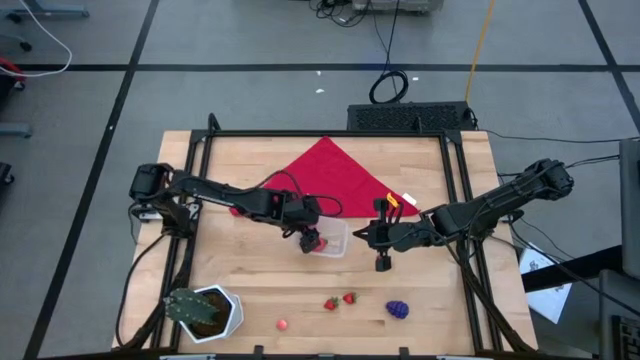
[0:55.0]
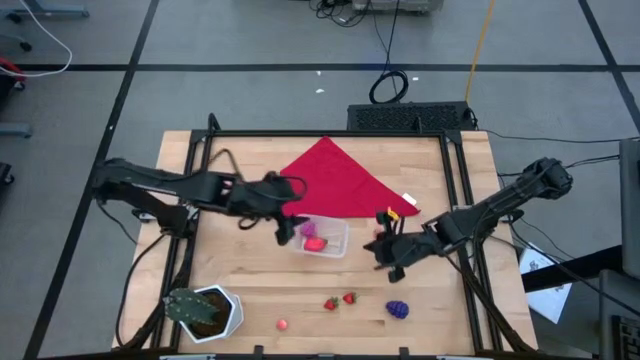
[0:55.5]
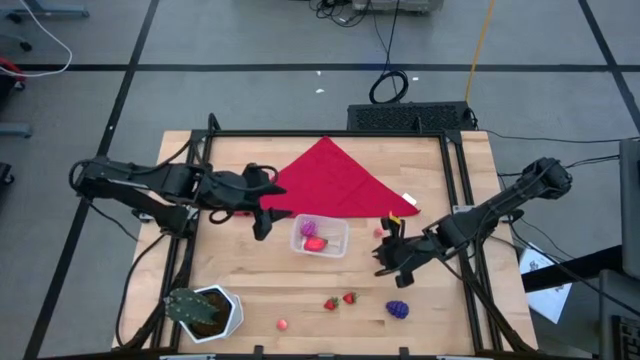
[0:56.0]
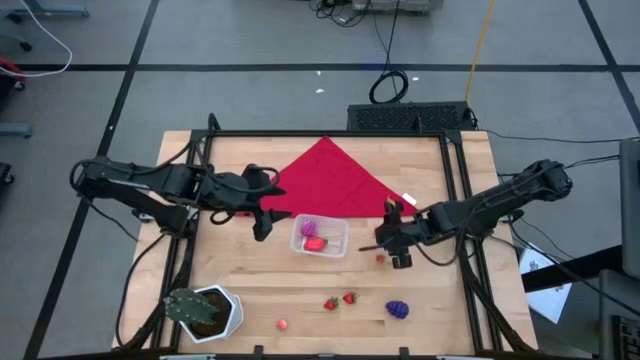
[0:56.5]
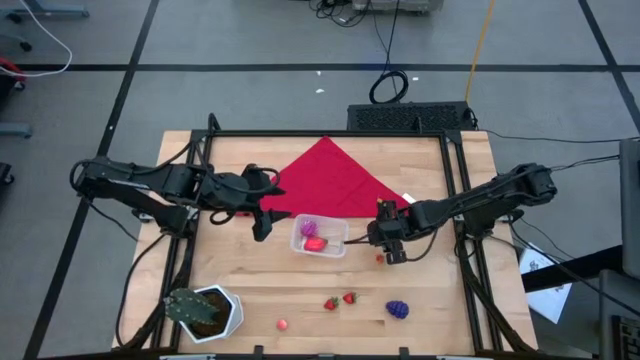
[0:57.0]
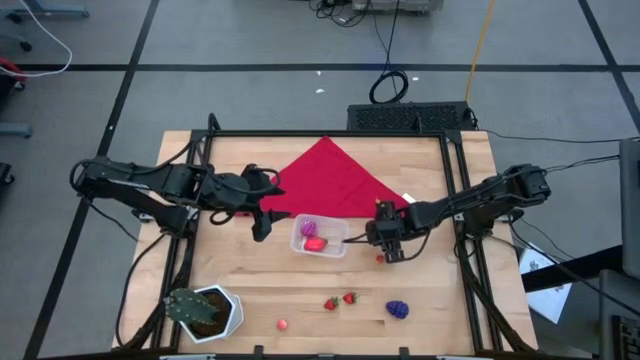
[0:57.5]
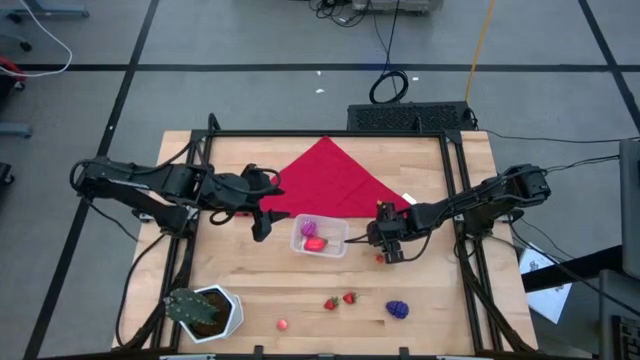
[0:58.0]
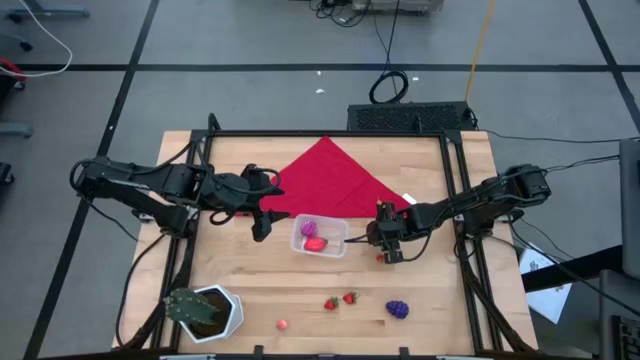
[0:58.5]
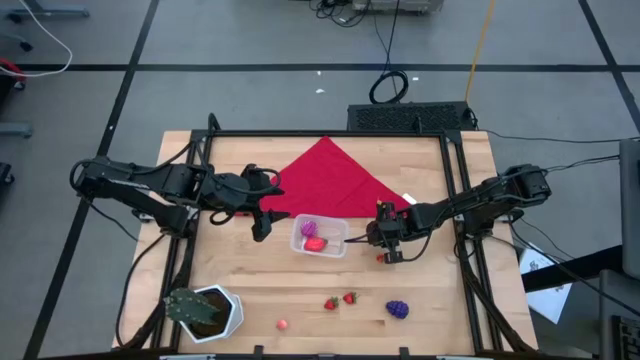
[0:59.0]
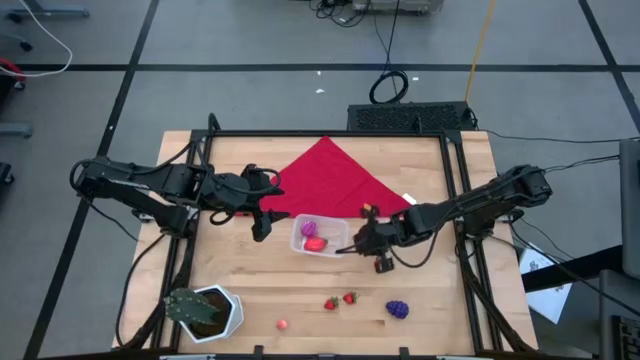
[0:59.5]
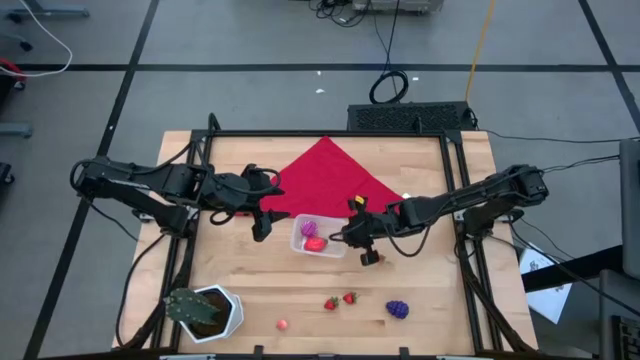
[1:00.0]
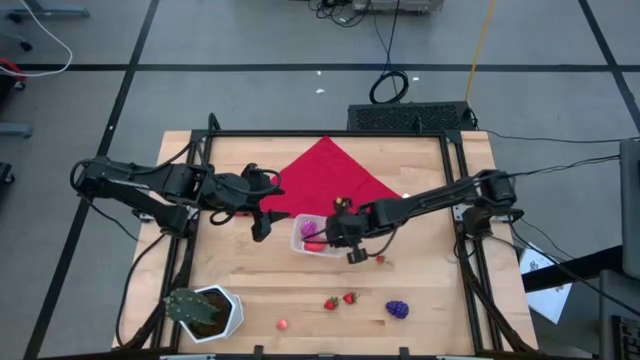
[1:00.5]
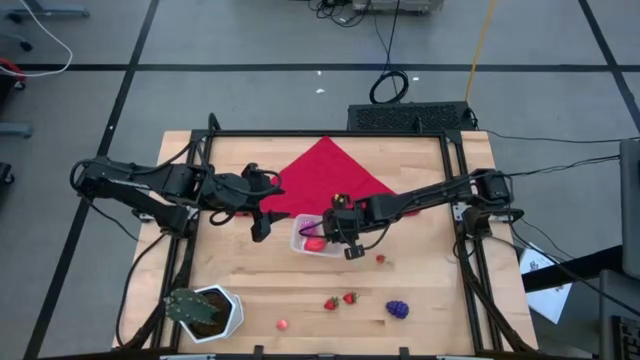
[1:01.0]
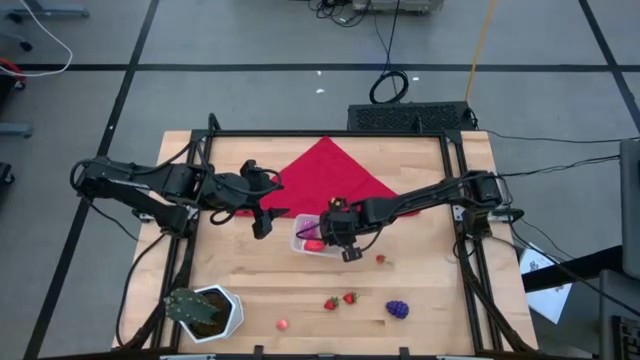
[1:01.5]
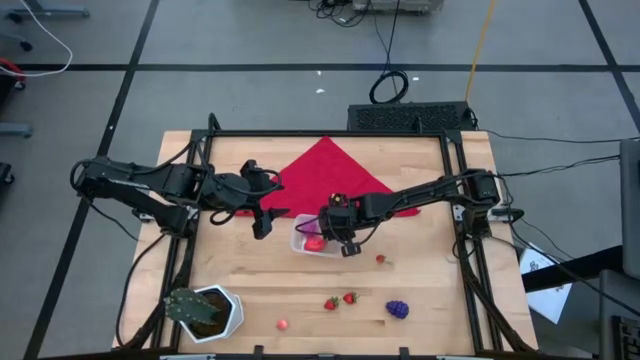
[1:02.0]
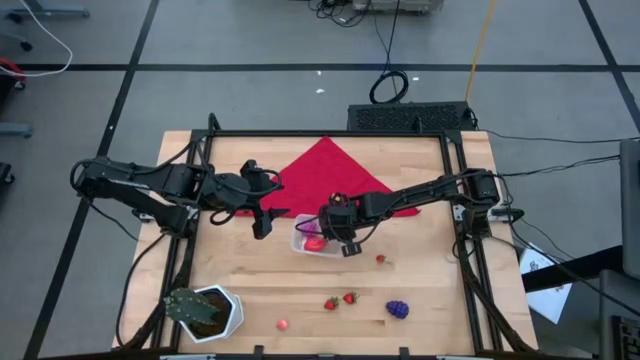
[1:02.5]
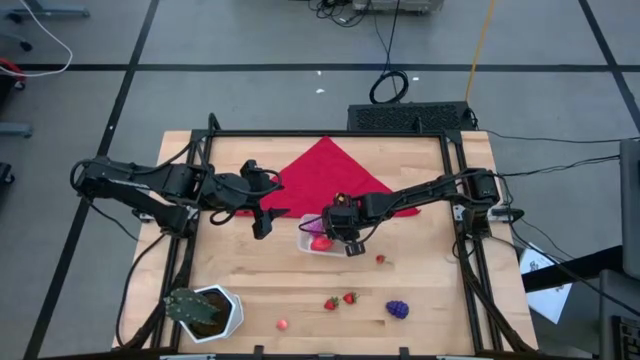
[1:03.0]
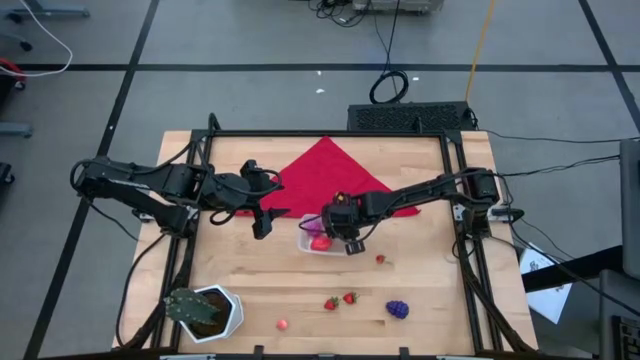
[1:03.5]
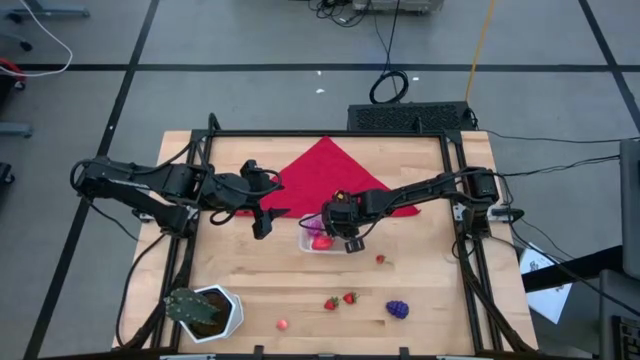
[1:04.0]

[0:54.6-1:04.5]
Task: Pick and placing Produce into tupperware
Put the top pink peach in the transparent bin

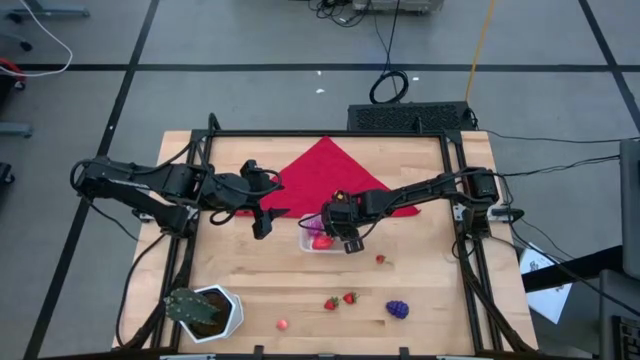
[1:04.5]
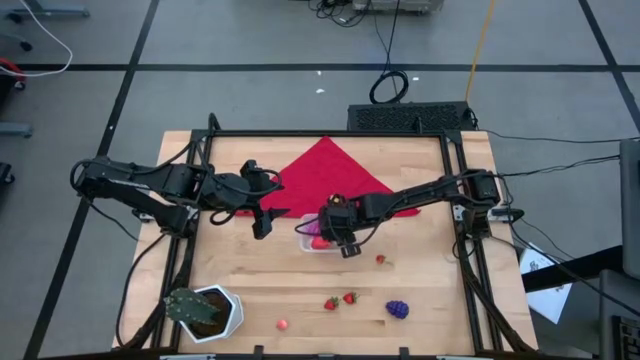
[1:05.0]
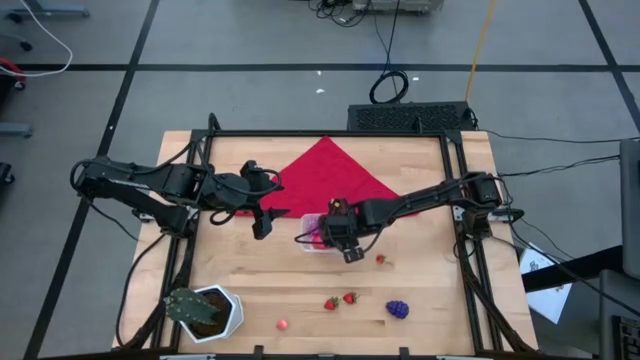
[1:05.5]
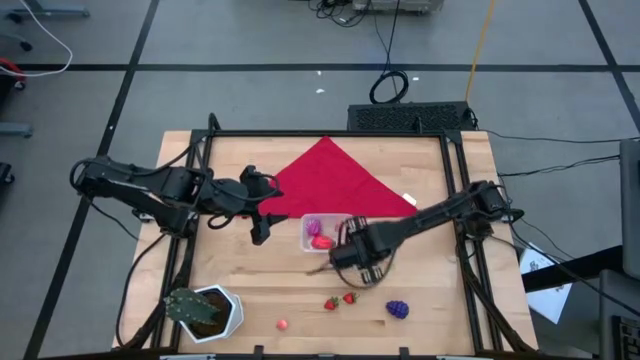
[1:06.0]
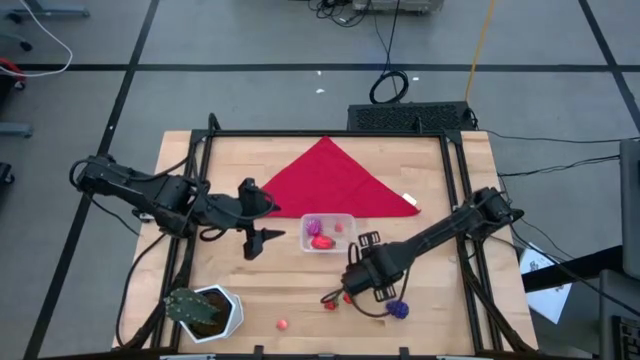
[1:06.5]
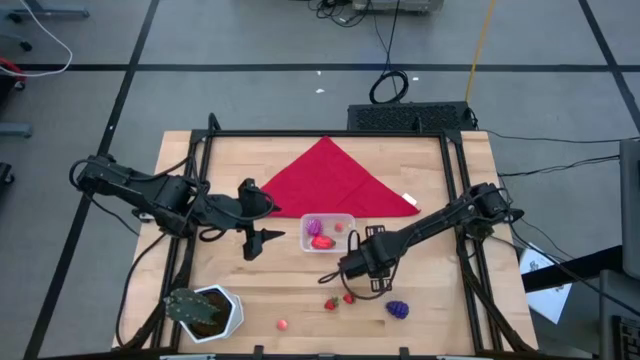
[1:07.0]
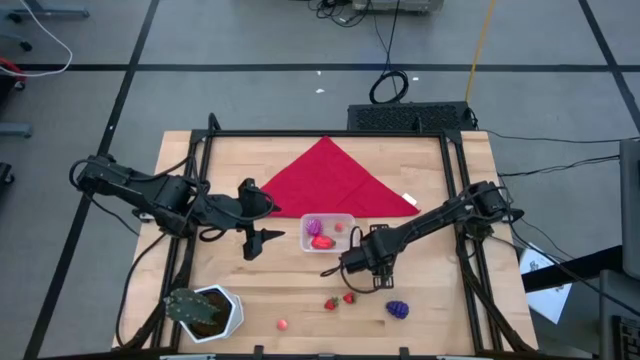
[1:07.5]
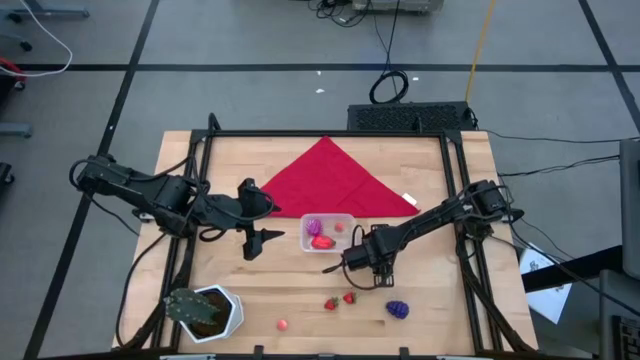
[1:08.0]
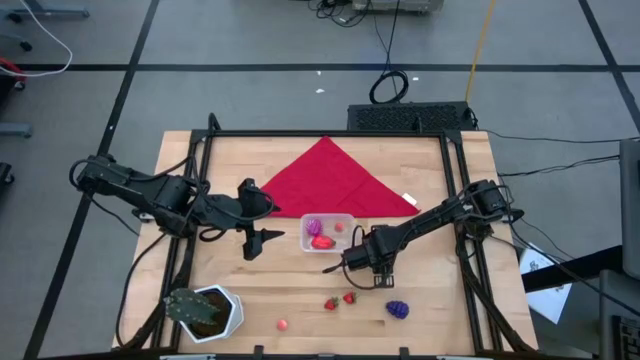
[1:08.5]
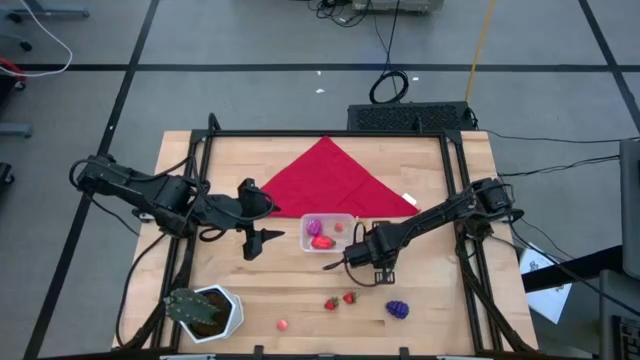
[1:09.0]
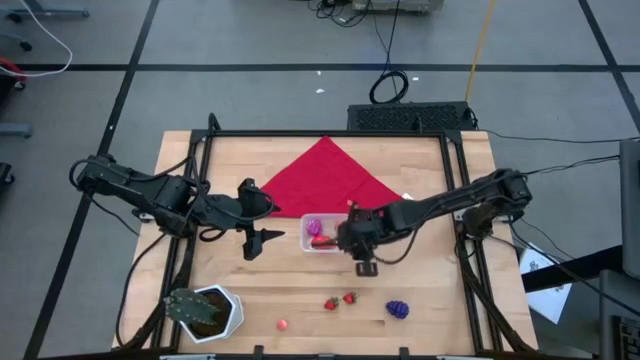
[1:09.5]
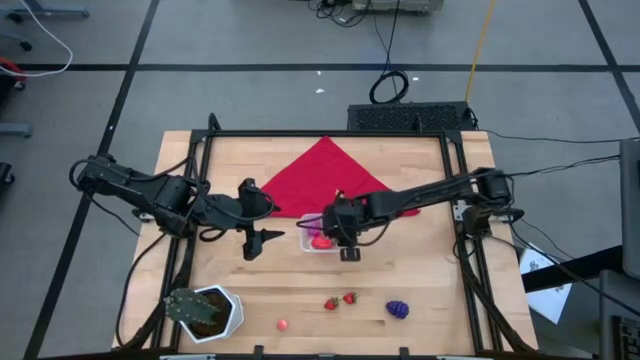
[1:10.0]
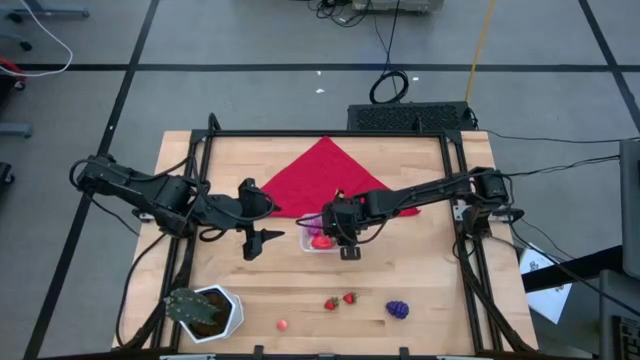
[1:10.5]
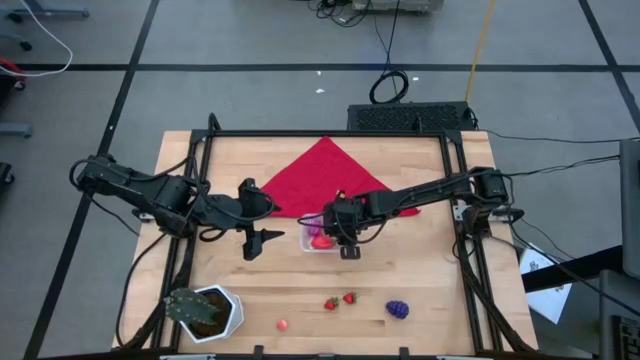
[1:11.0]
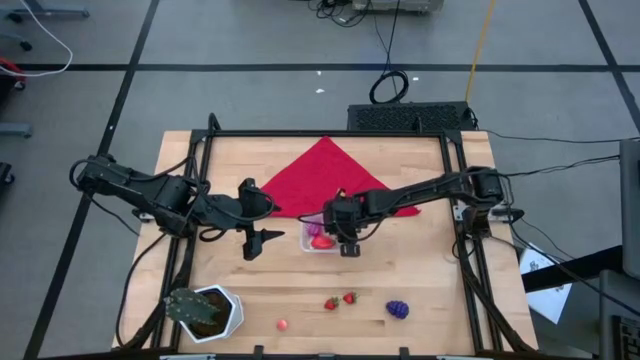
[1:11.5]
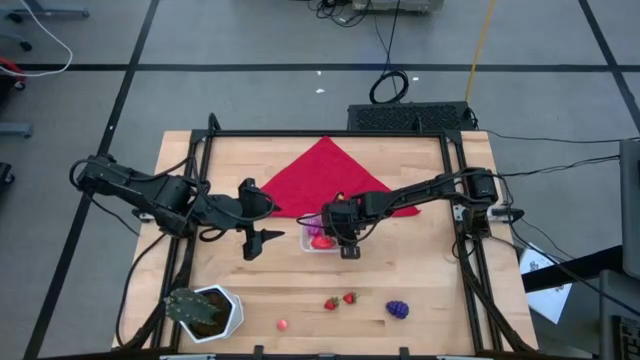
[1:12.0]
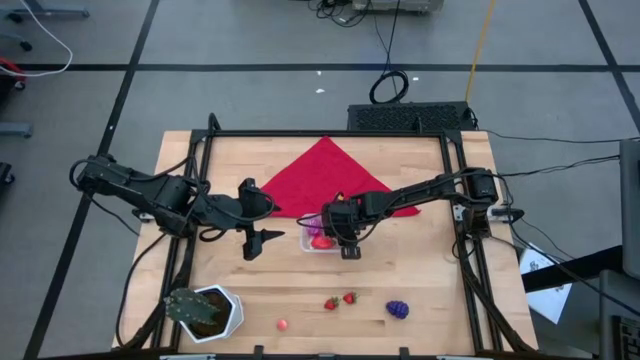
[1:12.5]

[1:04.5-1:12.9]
Put the top red strawberry in the transparent bin

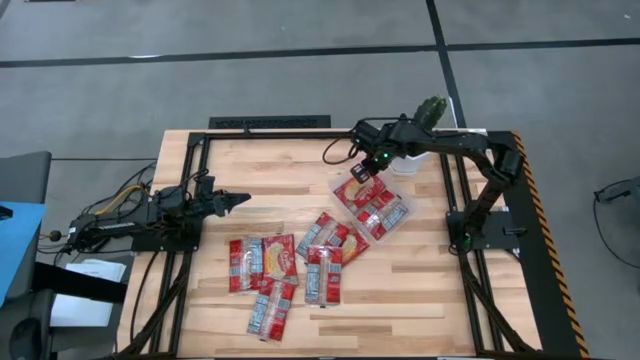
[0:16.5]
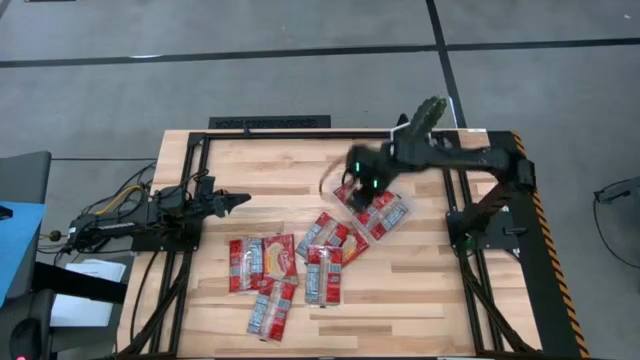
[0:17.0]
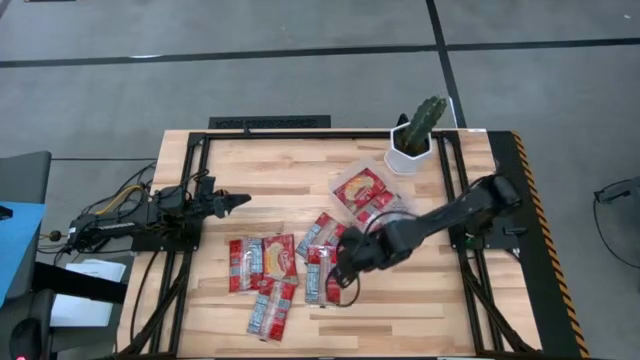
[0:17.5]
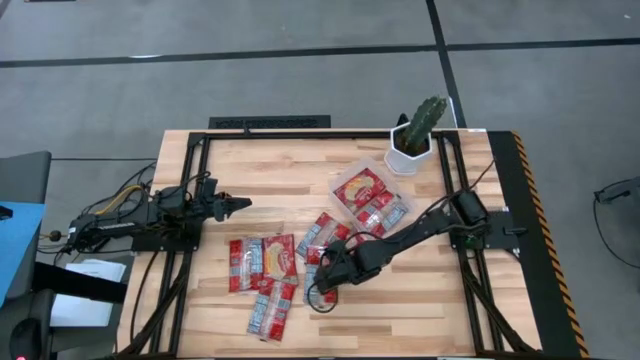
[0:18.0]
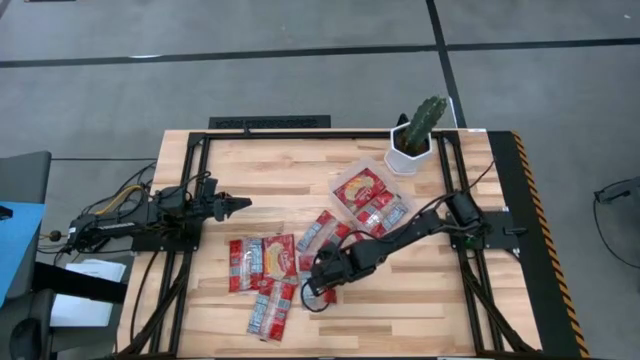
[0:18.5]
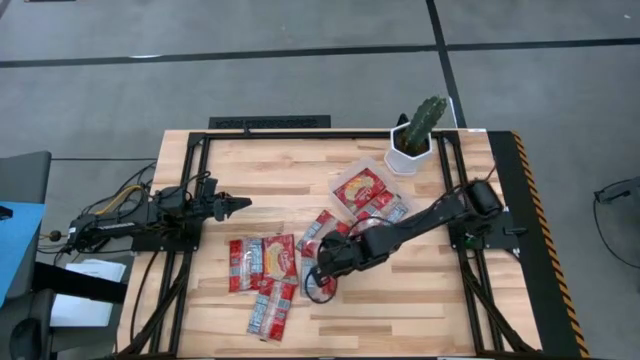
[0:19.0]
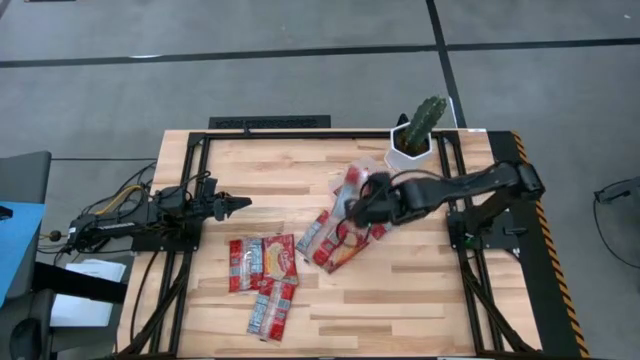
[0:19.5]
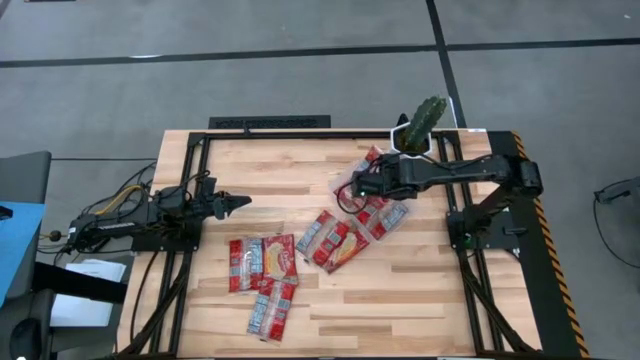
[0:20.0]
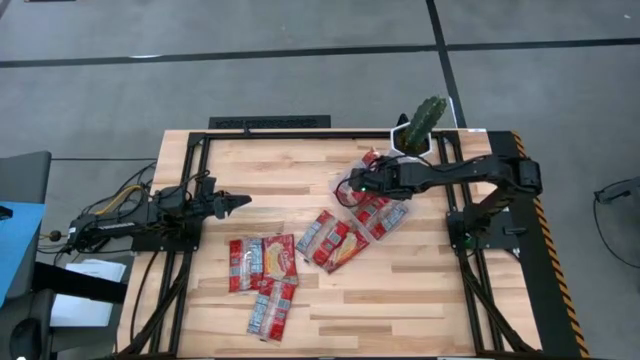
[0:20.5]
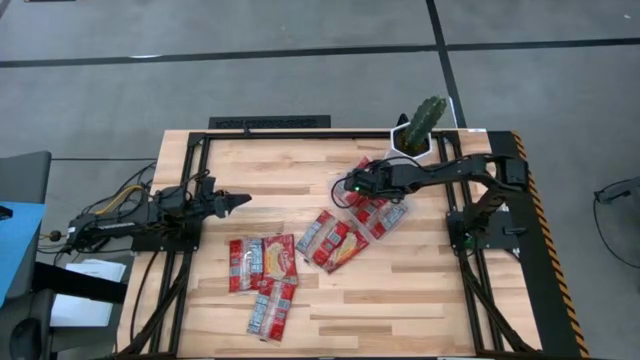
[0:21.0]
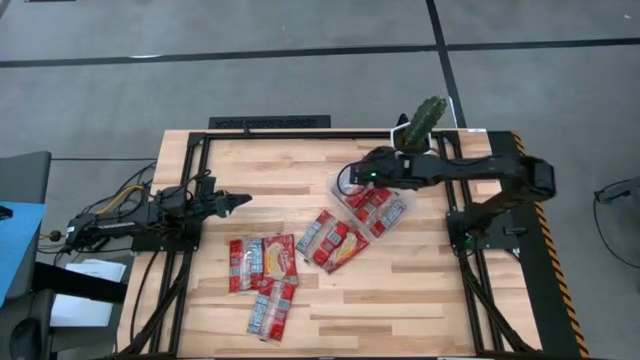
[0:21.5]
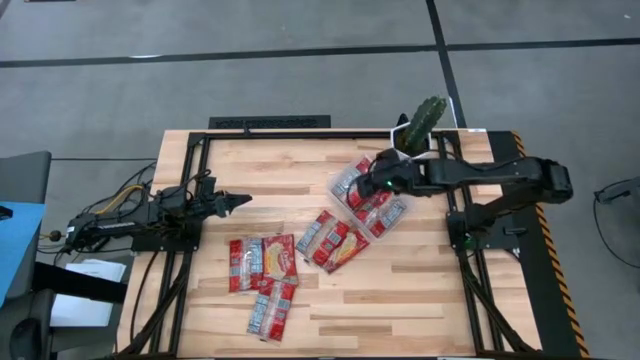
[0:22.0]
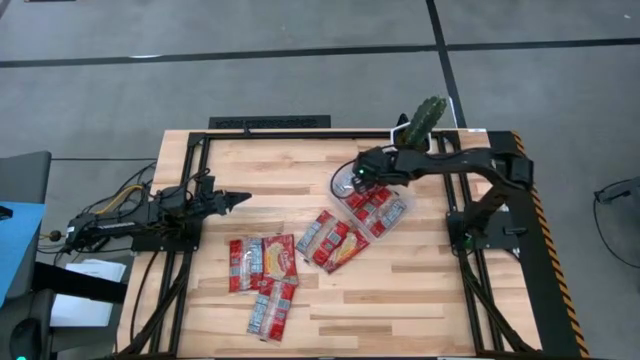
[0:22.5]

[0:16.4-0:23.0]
Task: Sort popcorn bags into baskets
Put the red popcorn pack into the transparent bin
